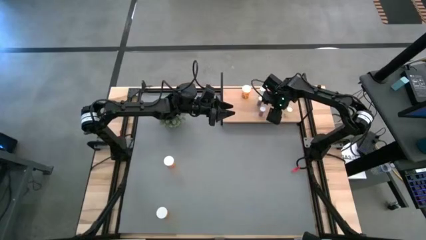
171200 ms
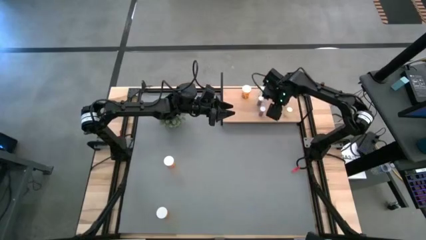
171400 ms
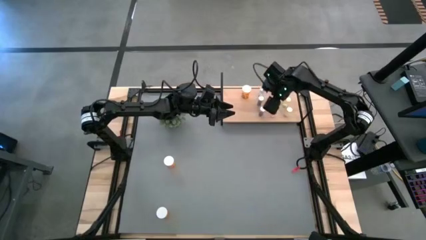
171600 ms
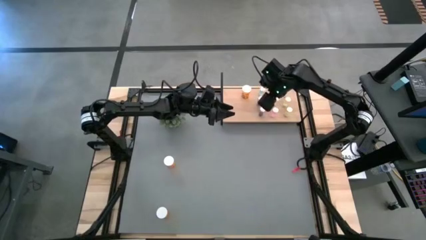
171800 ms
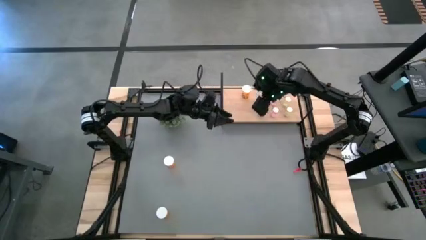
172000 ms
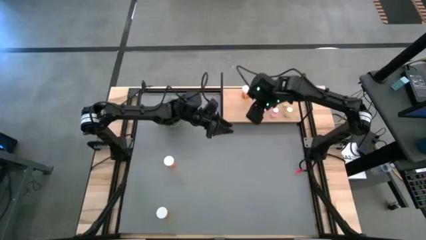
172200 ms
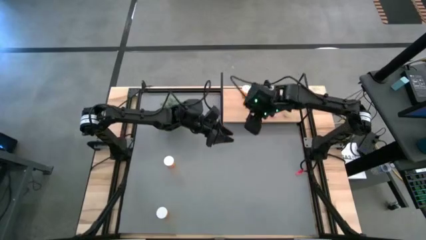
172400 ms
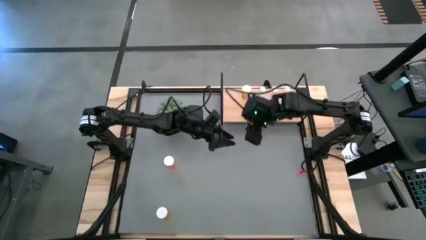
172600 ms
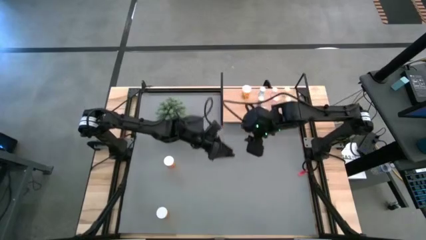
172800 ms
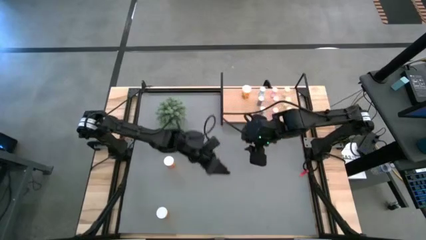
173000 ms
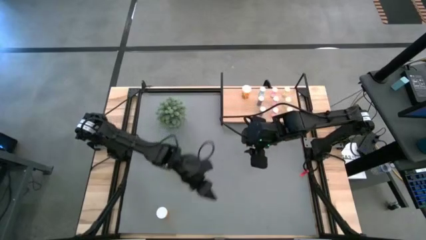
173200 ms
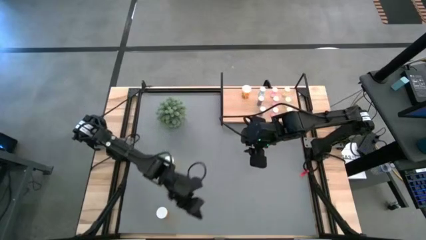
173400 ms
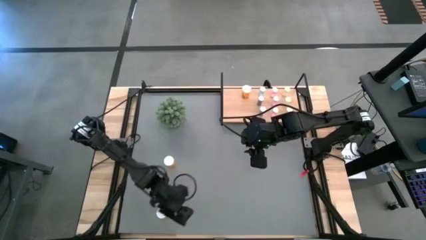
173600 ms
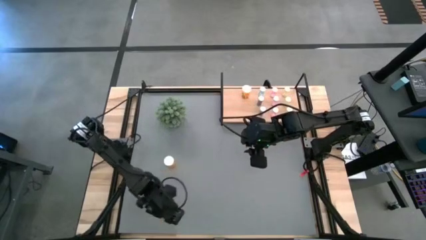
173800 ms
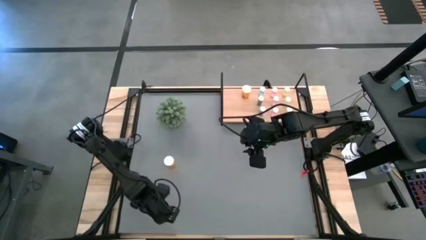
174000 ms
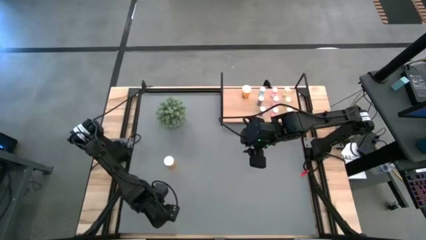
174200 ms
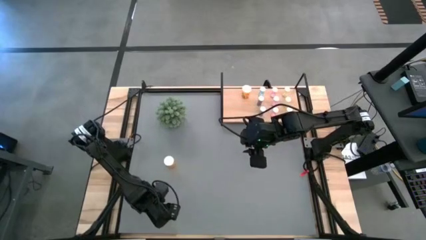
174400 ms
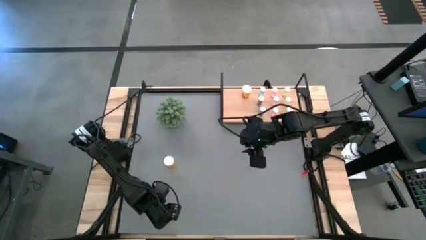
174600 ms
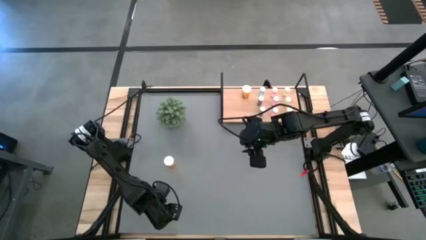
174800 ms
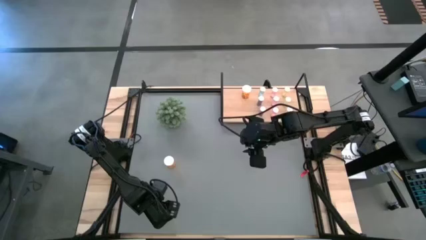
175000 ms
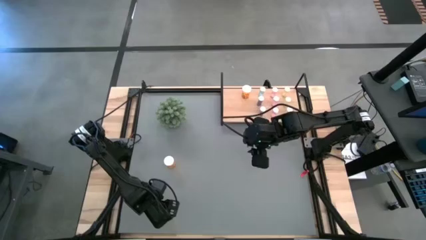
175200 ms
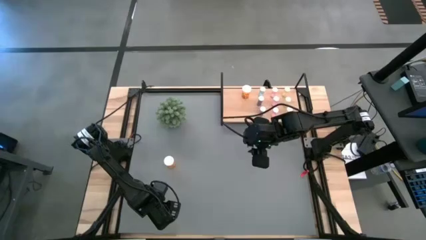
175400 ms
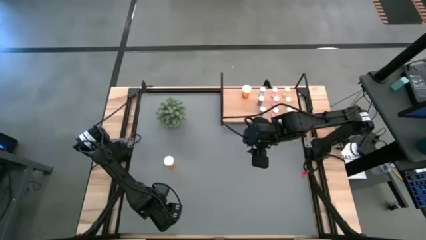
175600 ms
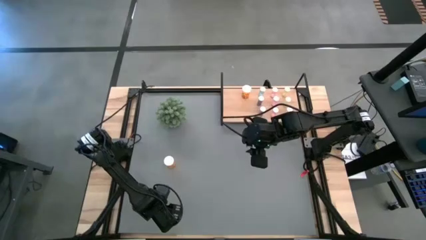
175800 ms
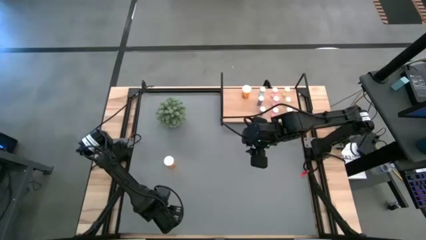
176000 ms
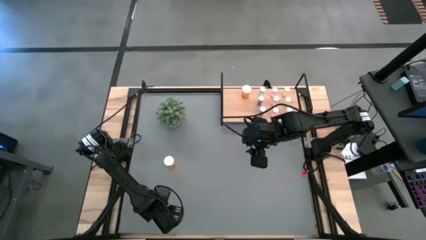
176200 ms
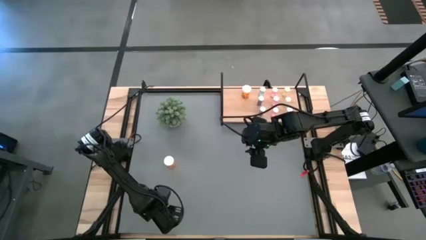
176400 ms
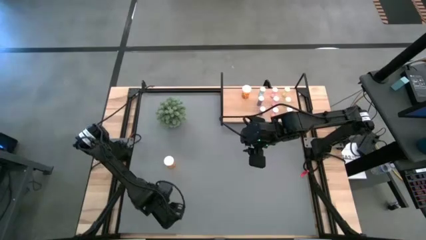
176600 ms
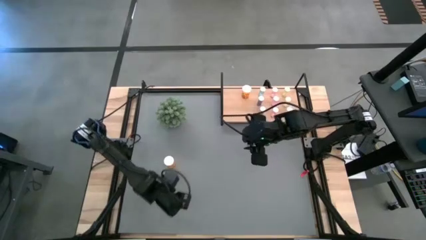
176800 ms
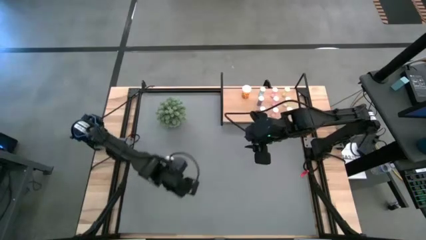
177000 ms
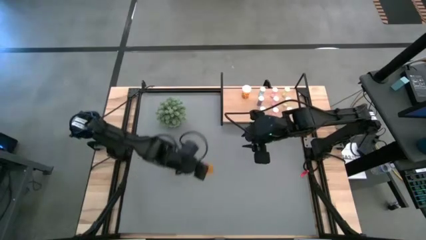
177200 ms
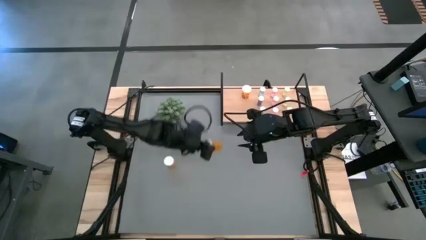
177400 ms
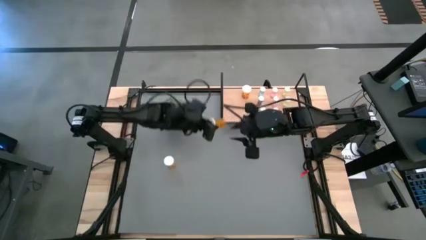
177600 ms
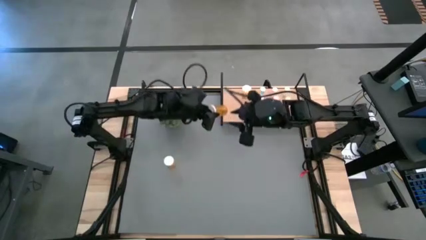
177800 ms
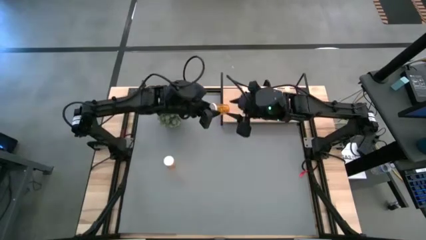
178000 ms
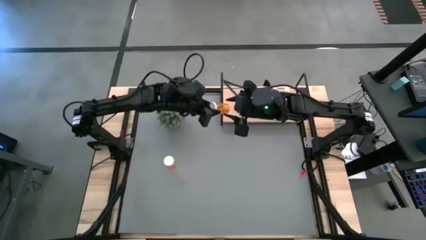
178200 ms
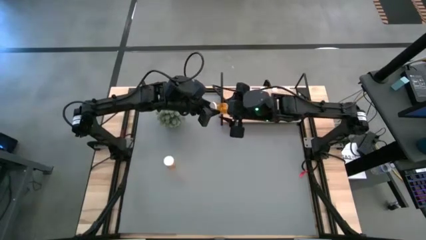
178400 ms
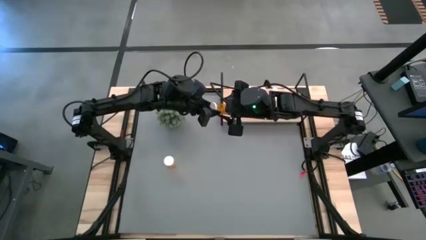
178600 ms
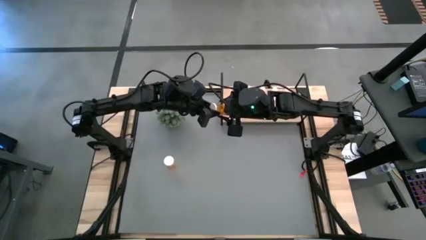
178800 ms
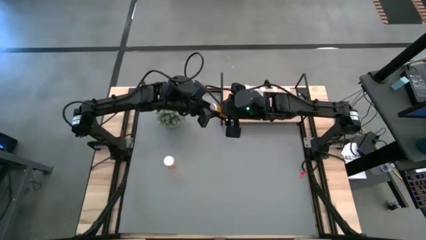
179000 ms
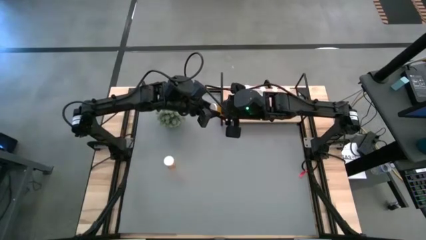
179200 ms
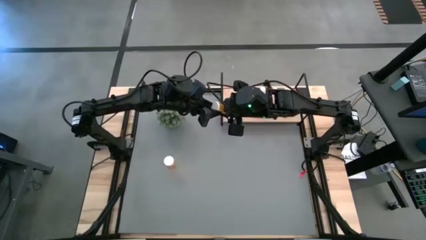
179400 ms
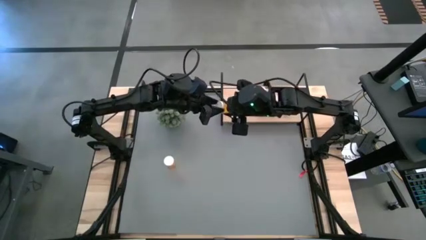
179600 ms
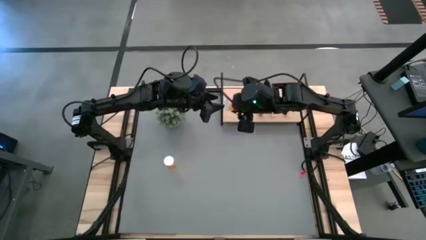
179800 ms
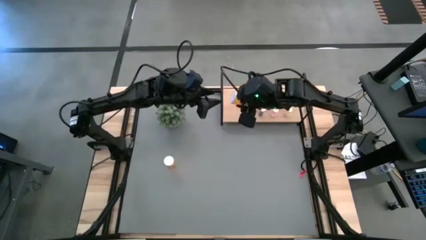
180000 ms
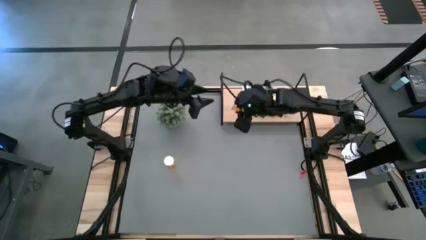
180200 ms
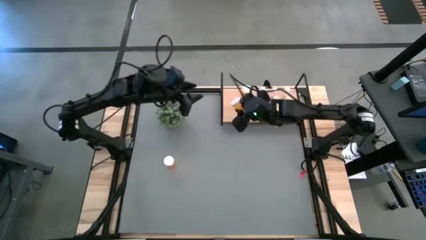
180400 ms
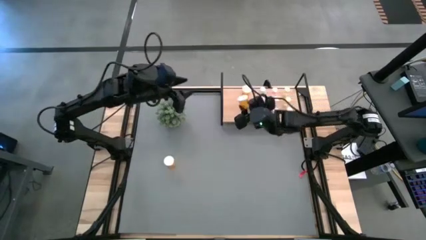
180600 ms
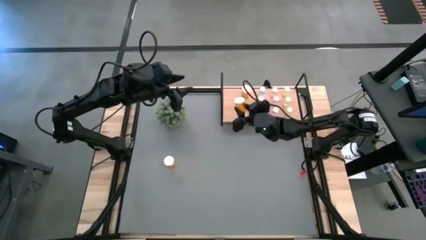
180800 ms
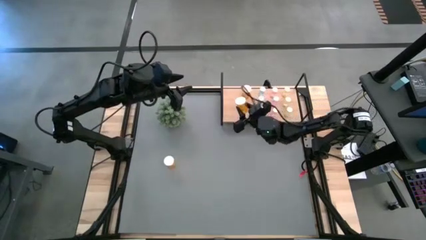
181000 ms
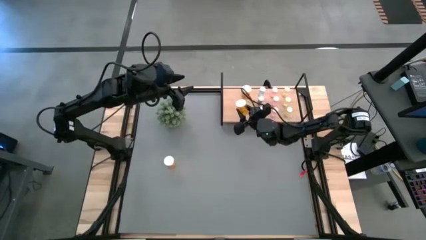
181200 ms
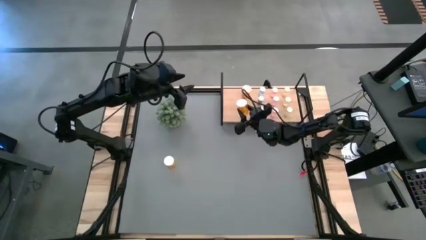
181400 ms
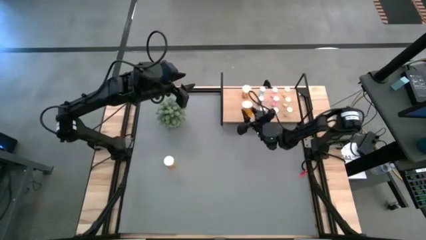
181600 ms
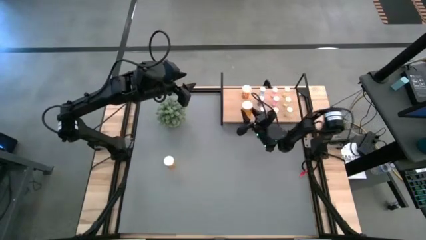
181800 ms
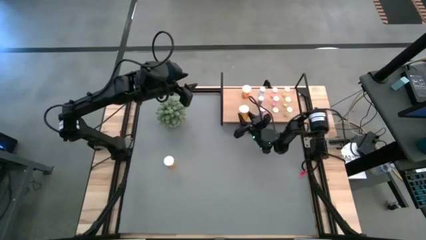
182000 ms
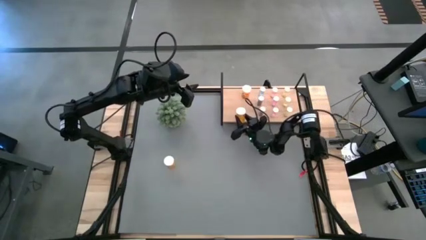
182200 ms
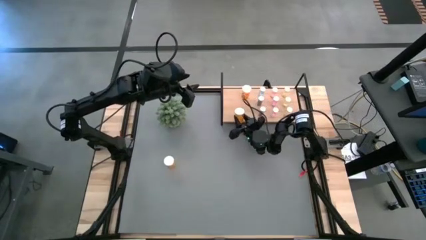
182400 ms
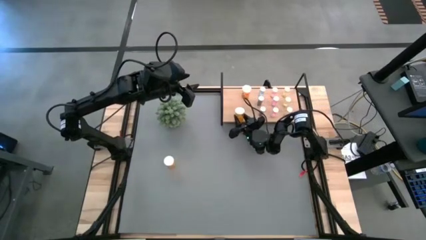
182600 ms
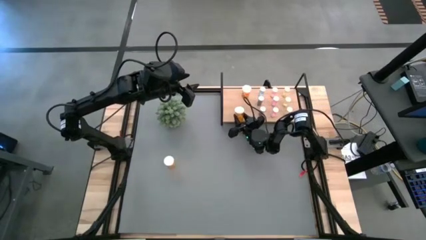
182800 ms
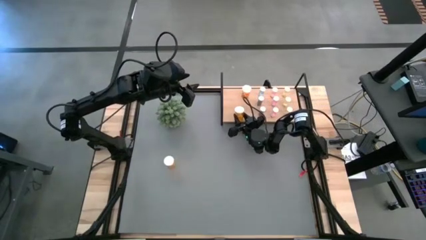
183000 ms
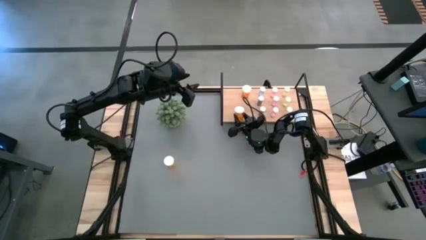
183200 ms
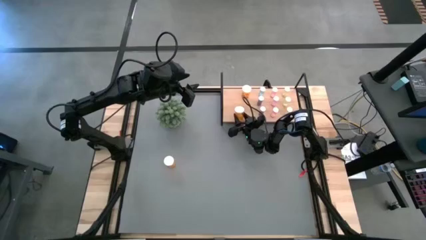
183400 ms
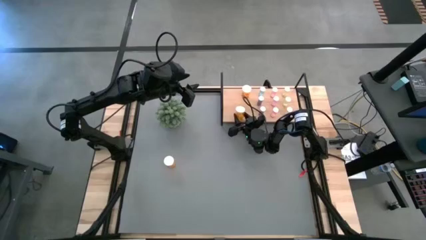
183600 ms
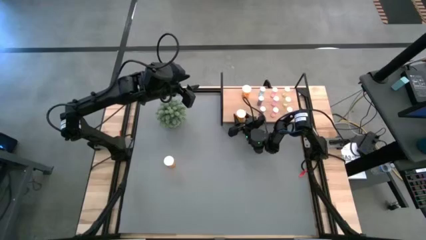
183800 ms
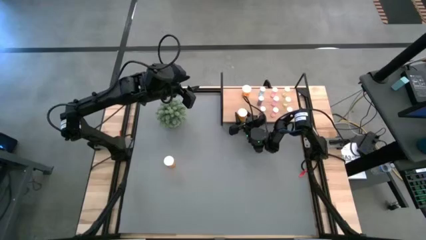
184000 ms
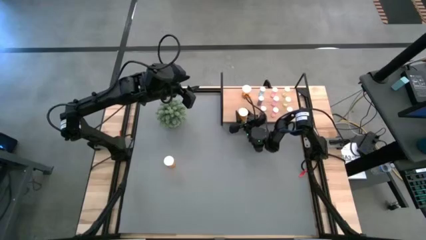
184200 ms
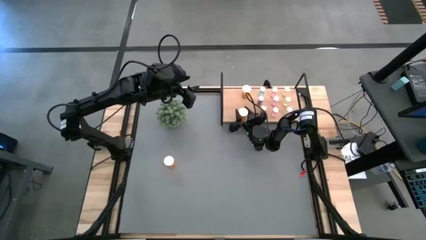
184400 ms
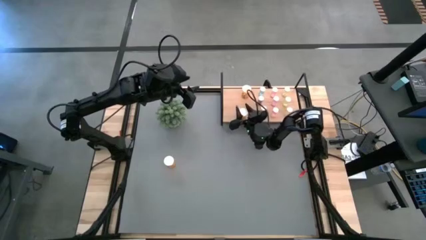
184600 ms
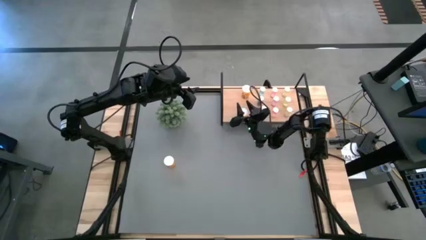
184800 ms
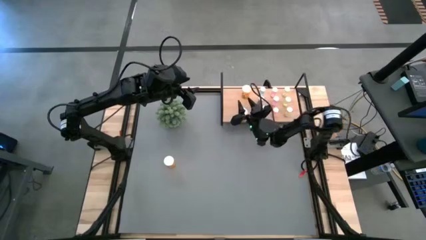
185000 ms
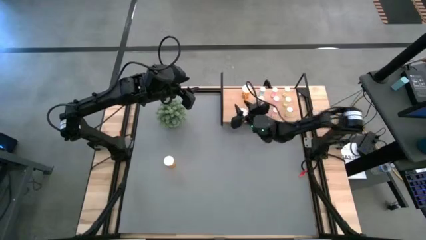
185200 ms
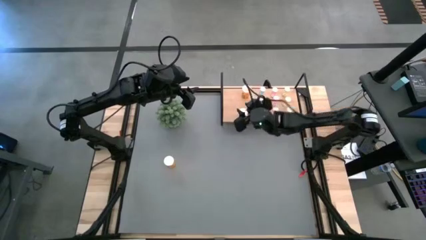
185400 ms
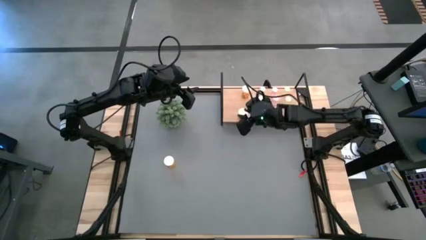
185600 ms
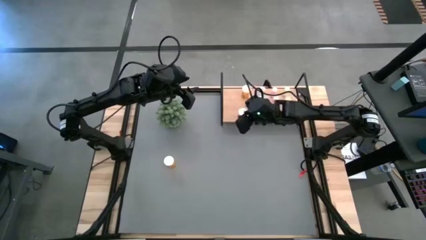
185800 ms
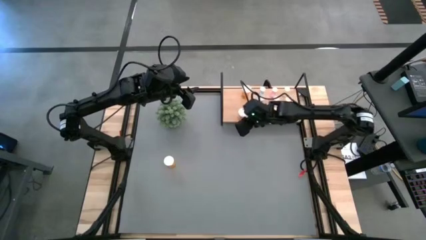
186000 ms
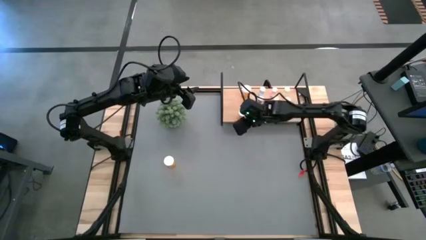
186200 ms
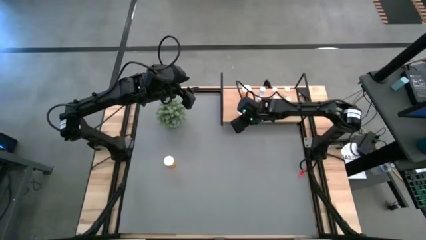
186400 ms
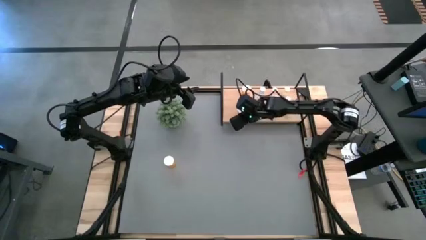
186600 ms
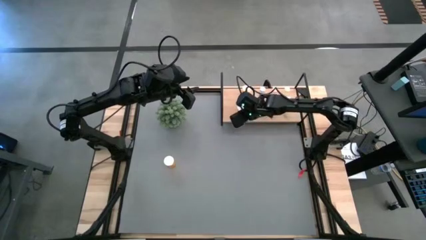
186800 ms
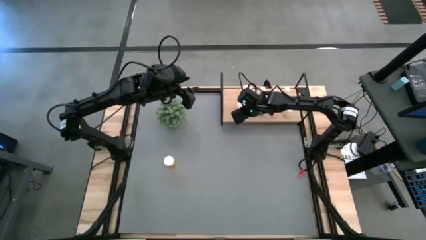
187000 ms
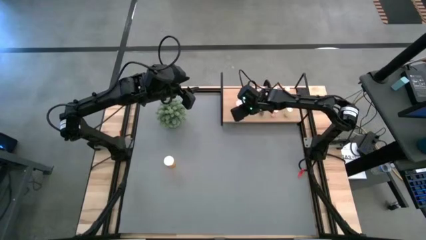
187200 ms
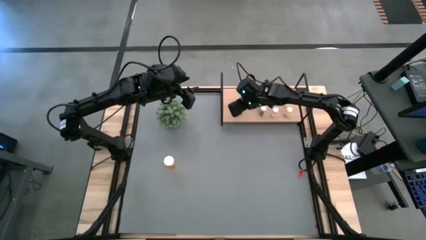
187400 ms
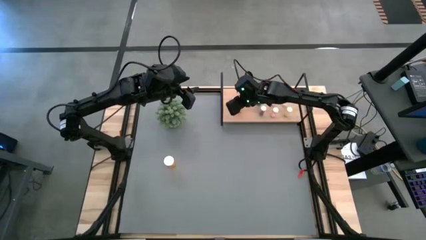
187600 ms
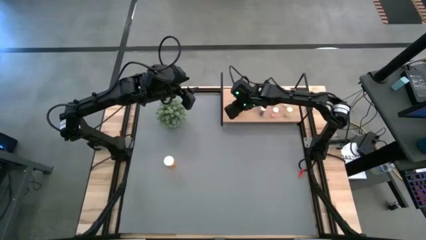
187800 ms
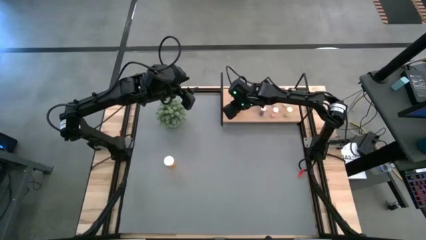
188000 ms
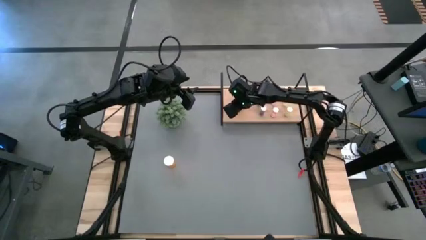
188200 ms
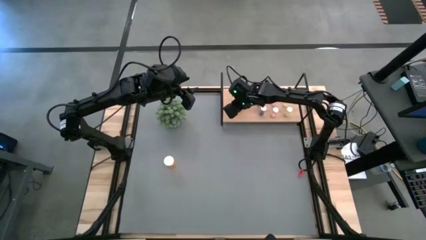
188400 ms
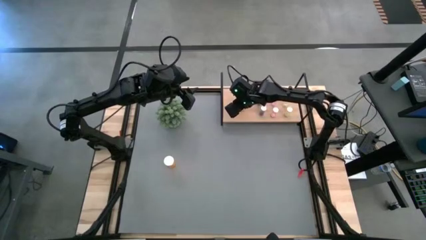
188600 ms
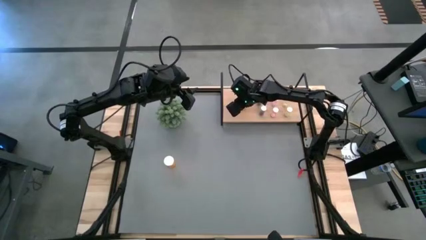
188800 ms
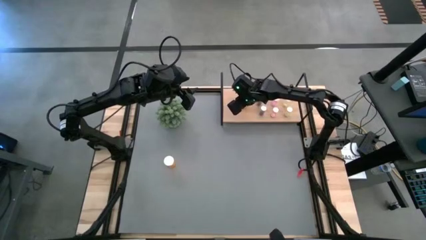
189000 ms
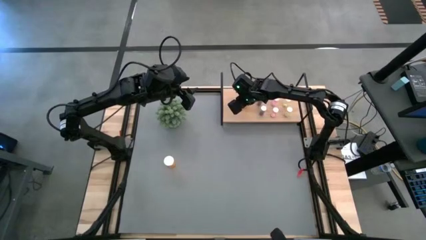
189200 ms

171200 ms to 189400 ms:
Task: Pick and place medicine bottles onto shelf by color
Put the bottom orange pill bottle on the shelf aligned with the other orange pill bottle
